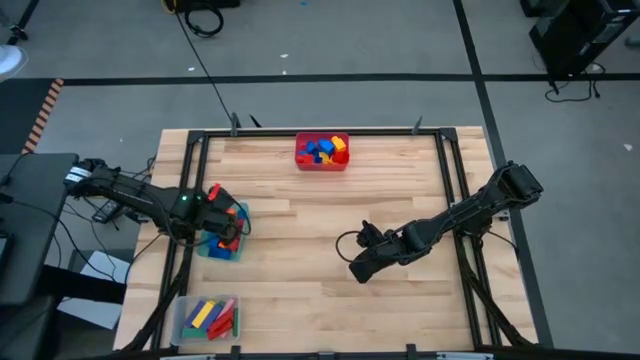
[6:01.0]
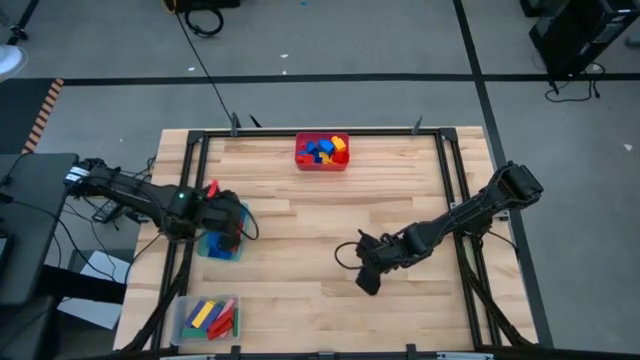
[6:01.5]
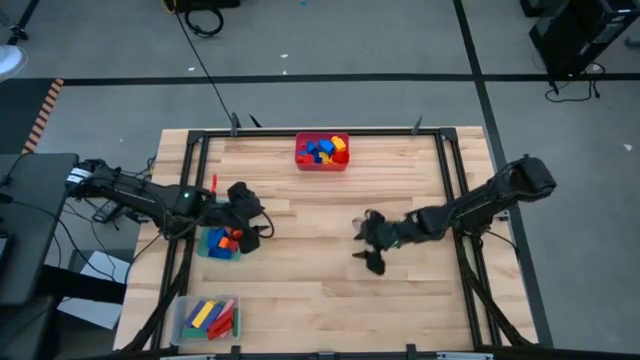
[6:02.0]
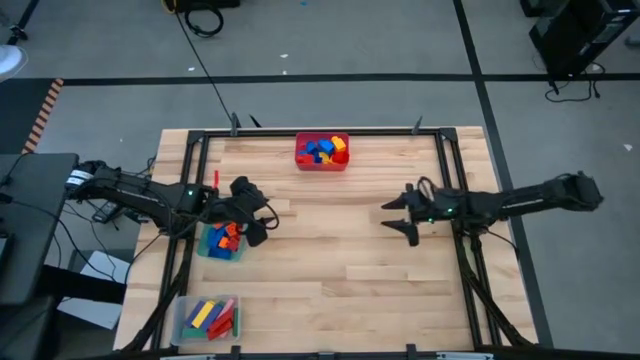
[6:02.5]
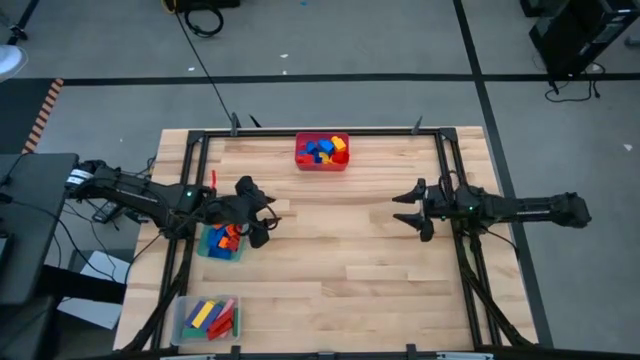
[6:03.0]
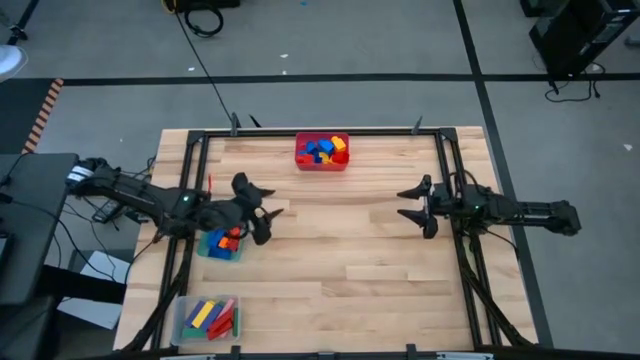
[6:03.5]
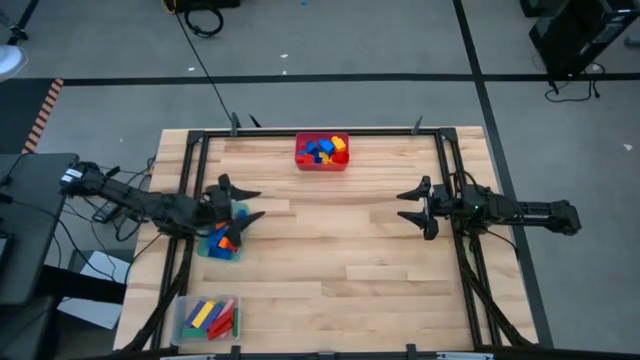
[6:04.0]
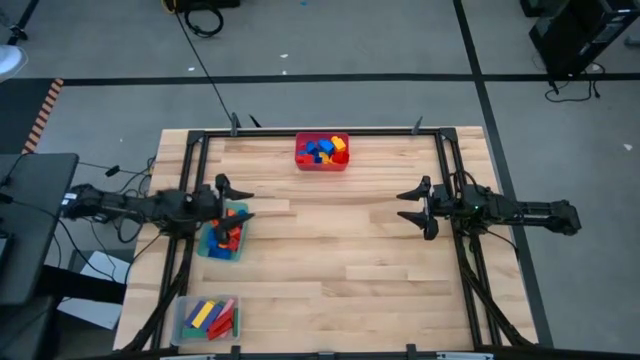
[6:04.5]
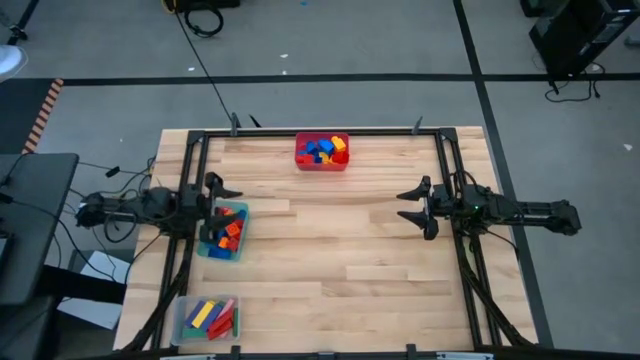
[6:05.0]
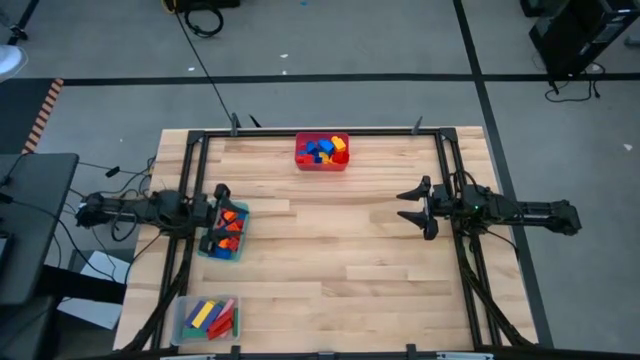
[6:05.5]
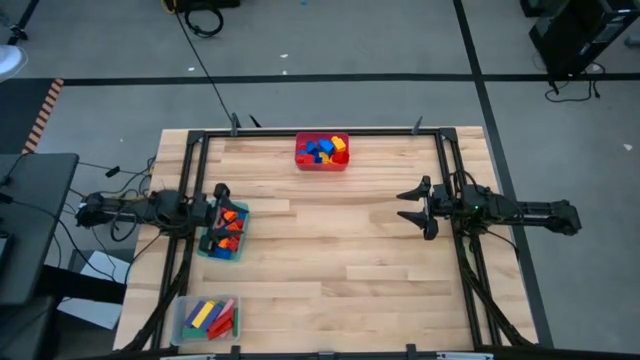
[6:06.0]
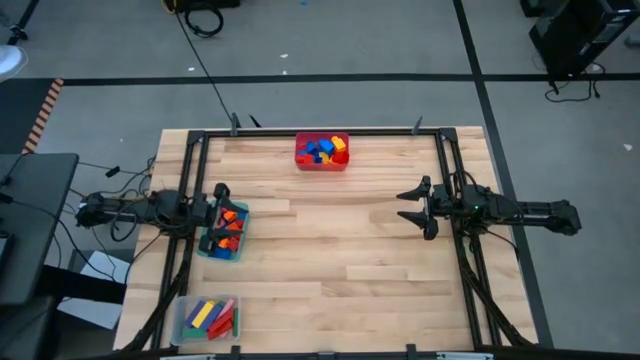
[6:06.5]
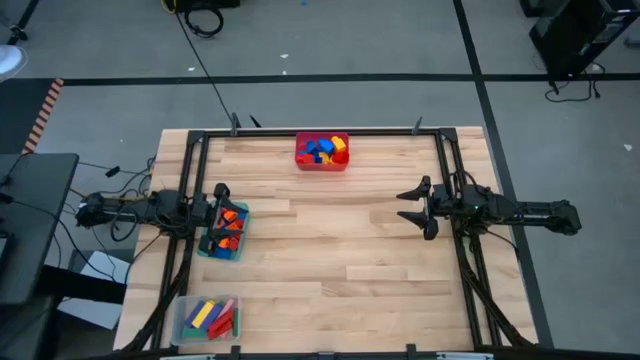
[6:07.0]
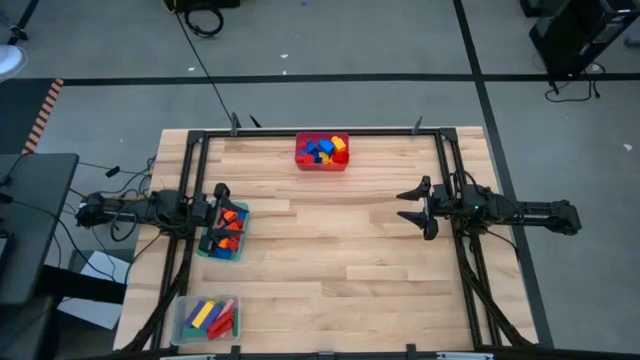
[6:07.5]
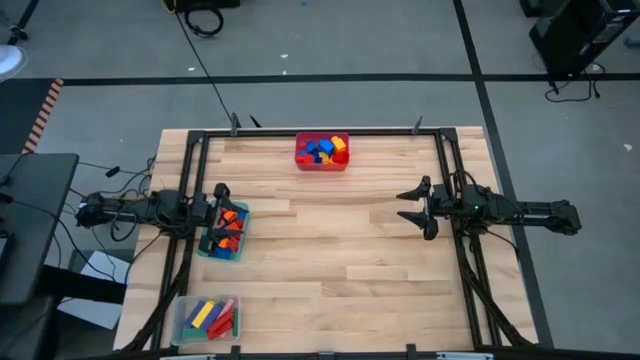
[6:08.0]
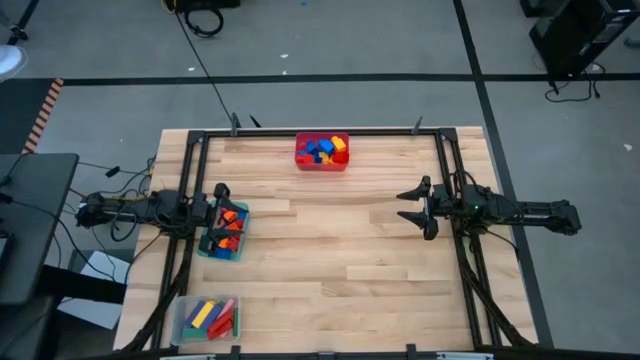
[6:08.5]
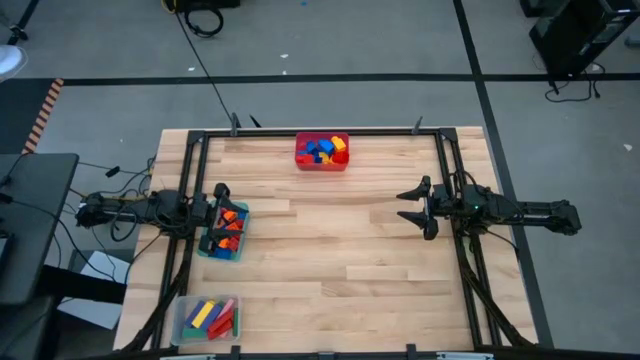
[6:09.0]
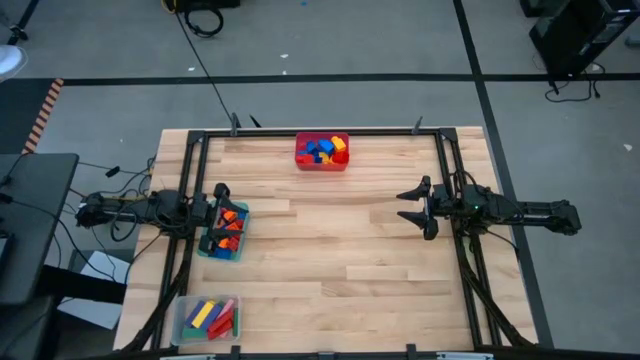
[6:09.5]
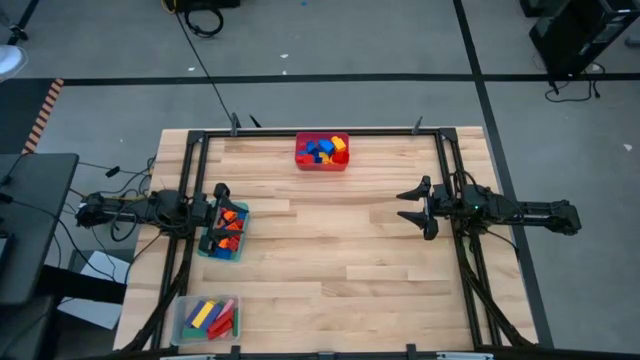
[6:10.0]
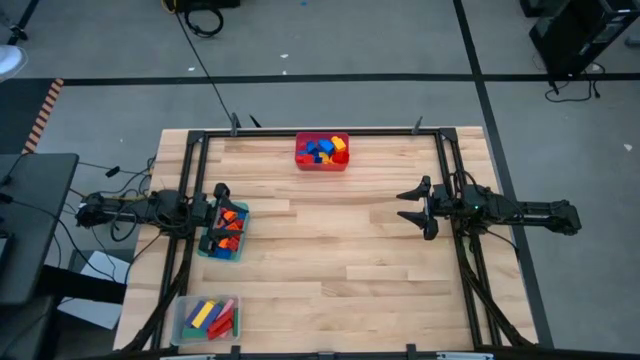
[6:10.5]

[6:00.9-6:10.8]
Task: Sort blocks by size
Return to Home Position

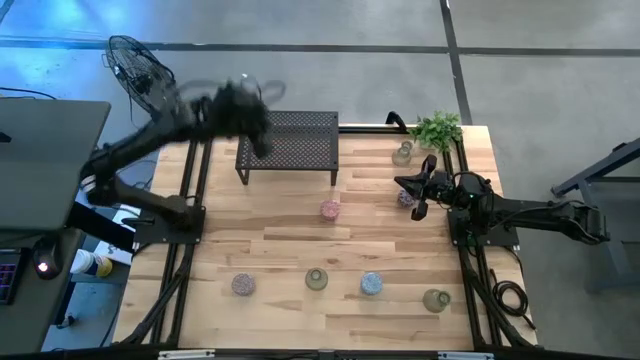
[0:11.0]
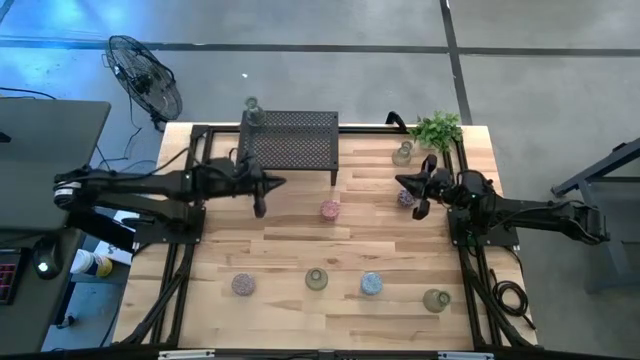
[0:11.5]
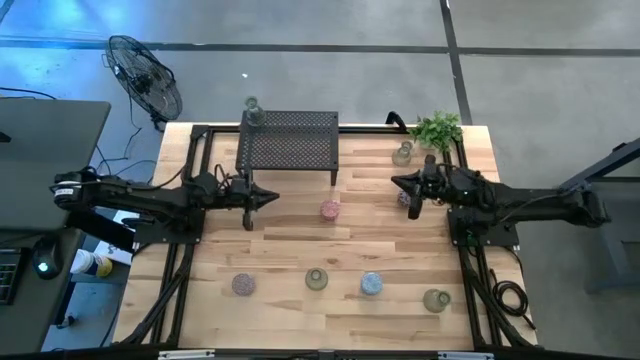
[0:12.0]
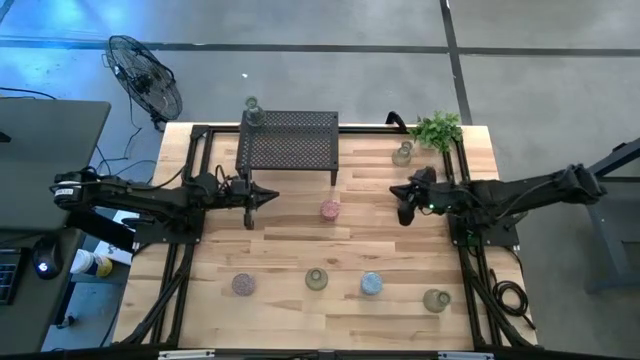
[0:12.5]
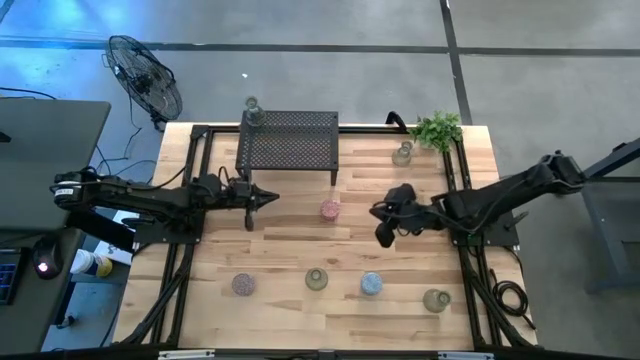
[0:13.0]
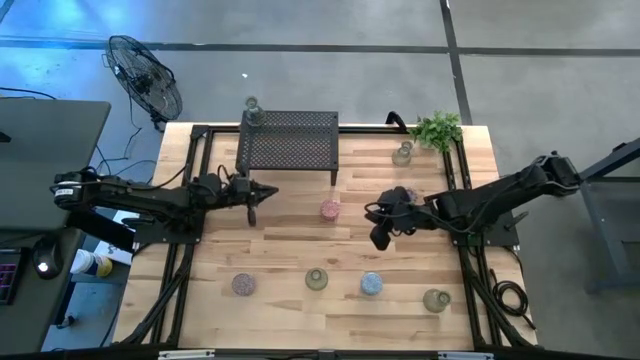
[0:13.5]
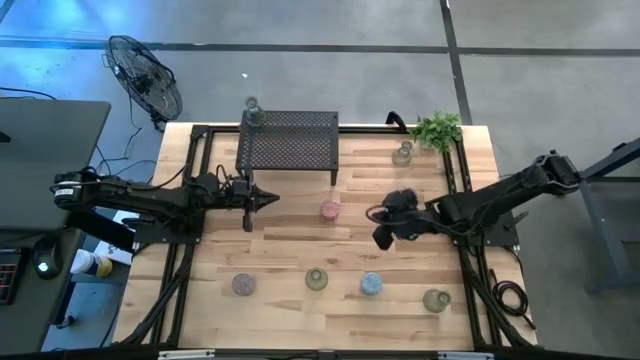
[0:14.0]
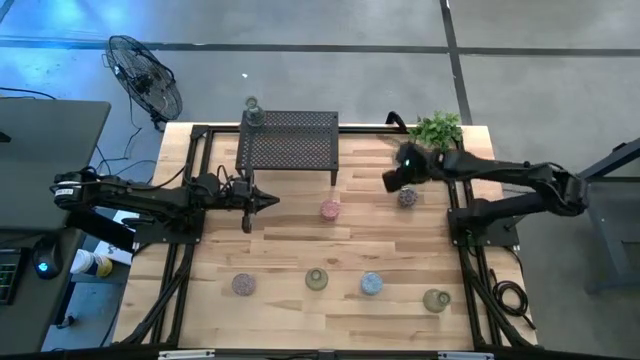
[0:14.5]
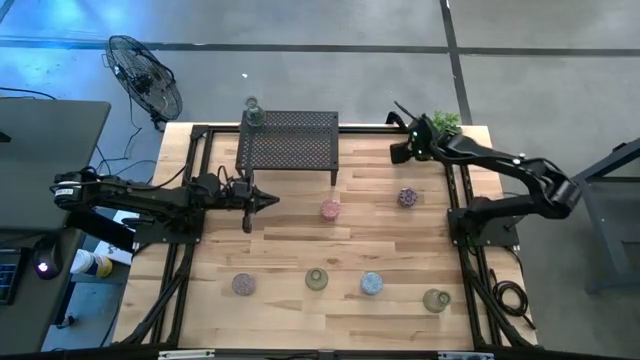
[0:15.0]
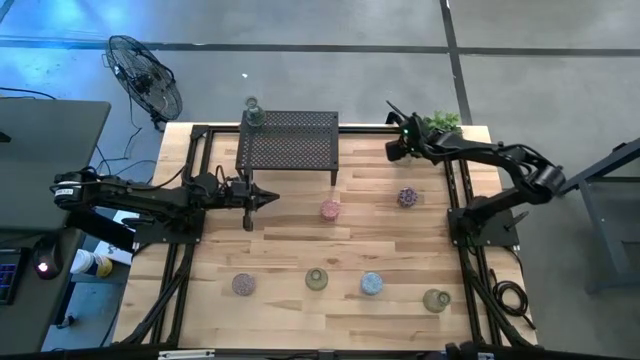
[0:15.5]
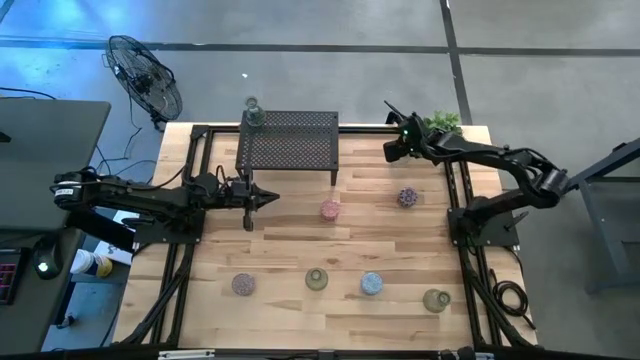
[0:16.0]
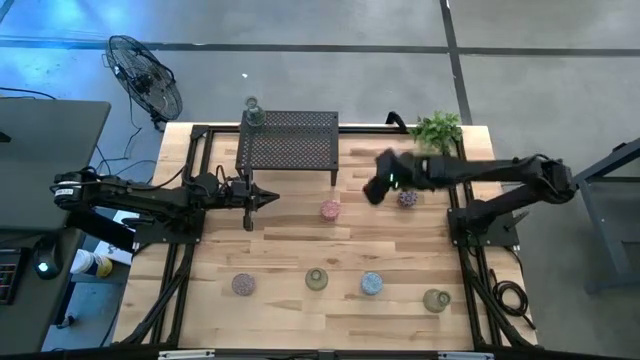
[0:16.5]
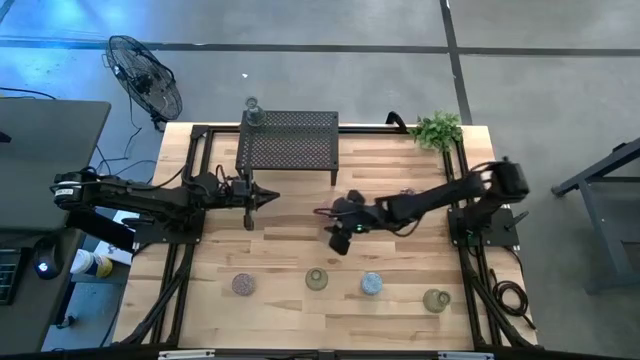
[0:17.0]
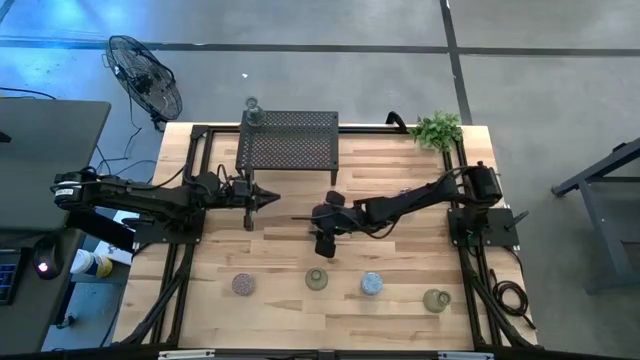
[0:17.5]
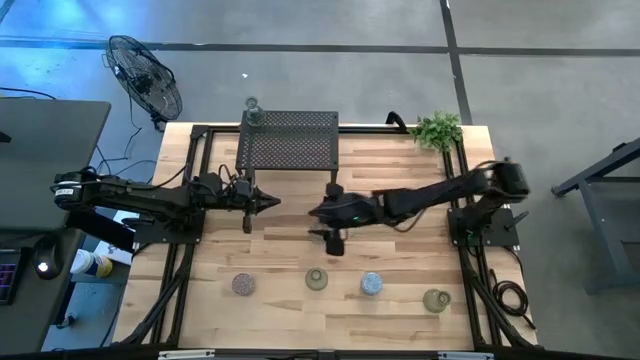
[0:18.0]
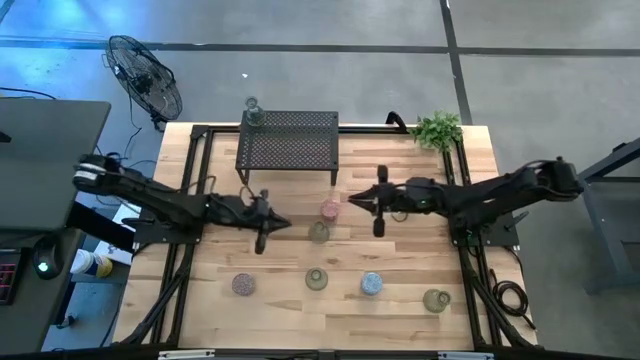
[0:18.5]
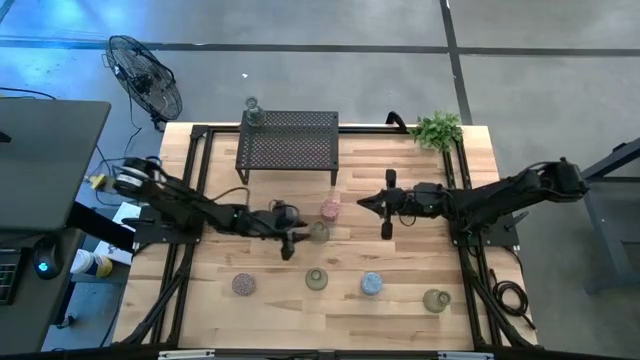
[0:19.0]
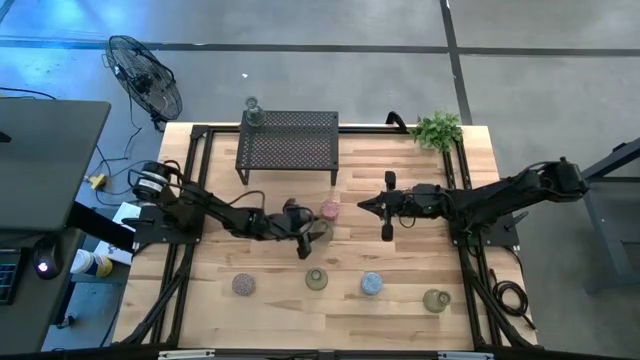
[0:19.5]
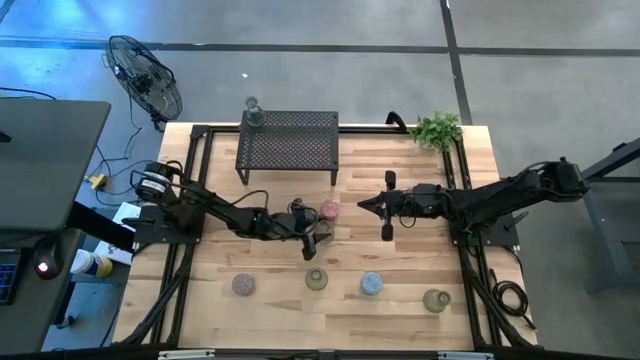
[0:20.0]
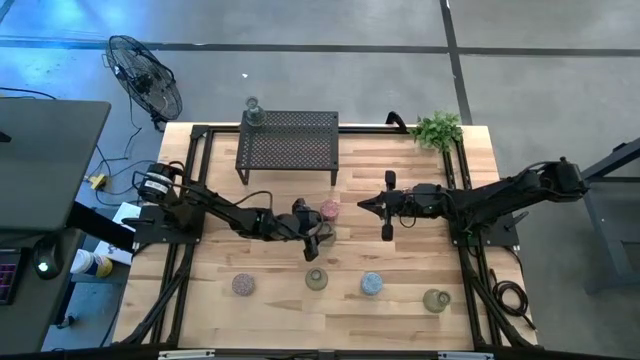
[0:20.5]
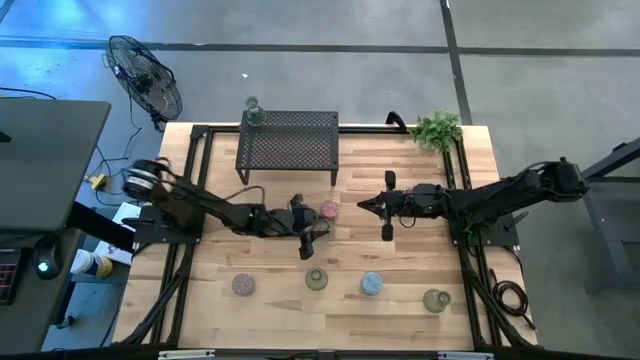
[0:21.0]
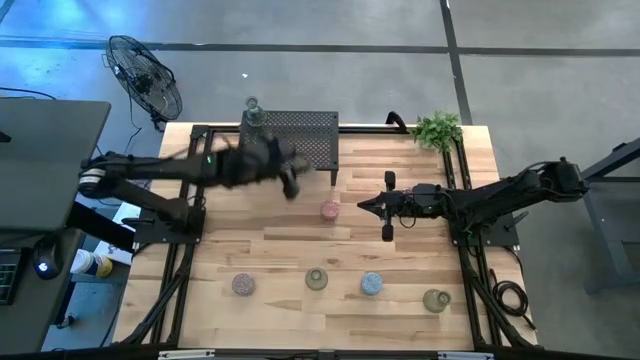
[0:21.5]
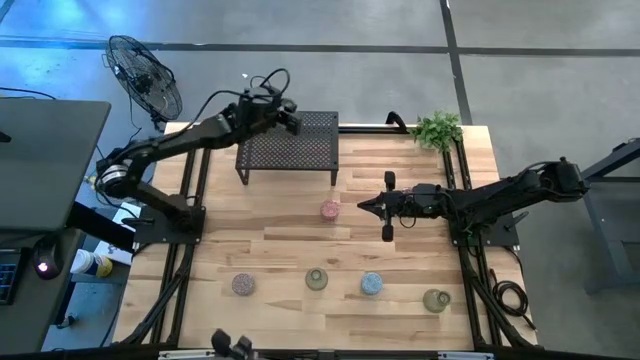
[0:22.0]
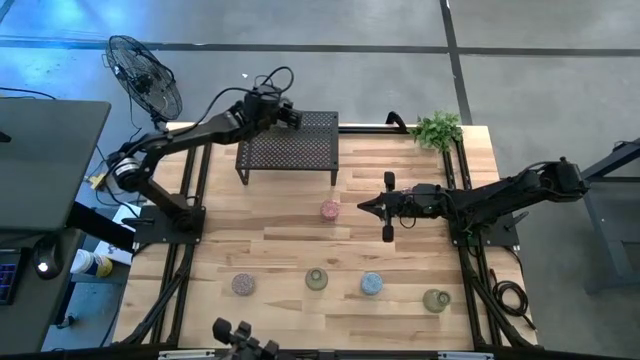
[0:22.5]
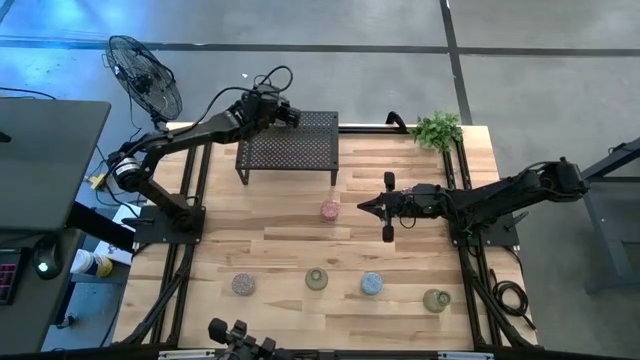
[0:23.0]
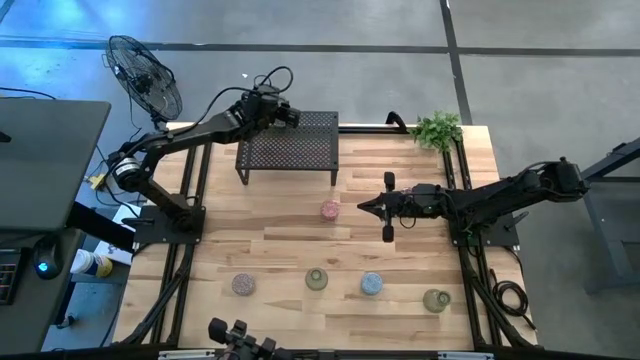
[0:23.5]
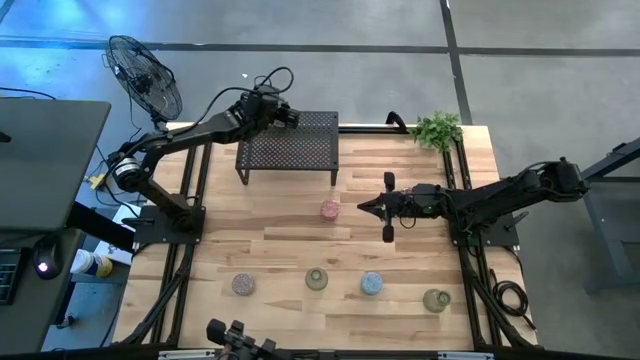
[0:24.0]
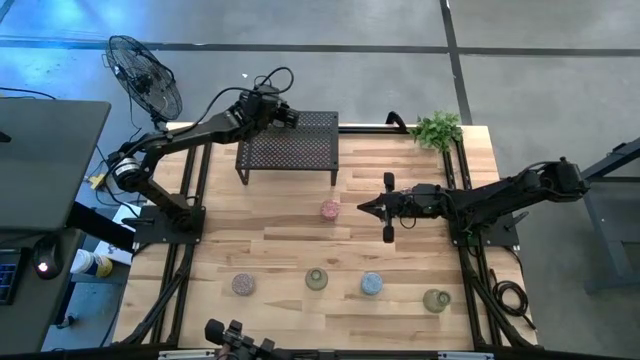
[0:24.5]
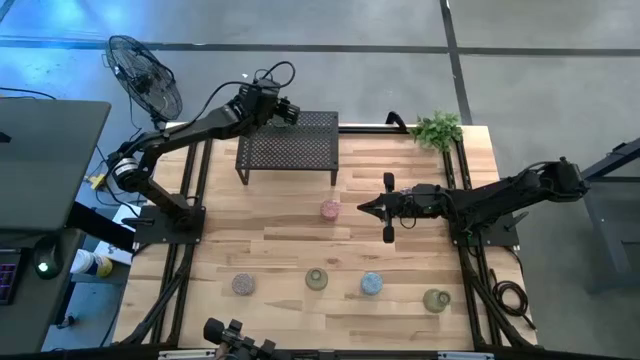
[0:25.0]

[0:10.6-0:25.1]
Task: Pick & Place candle stick holders
Put the green glass candle holder on the shelf
